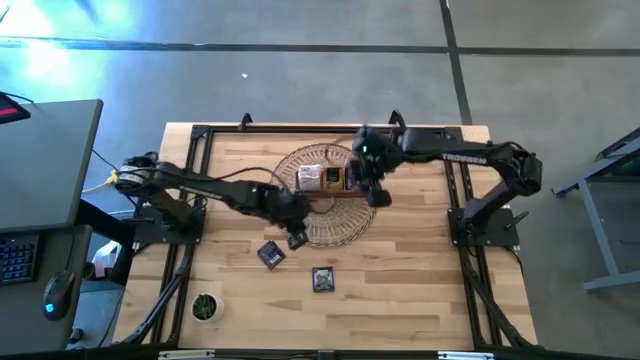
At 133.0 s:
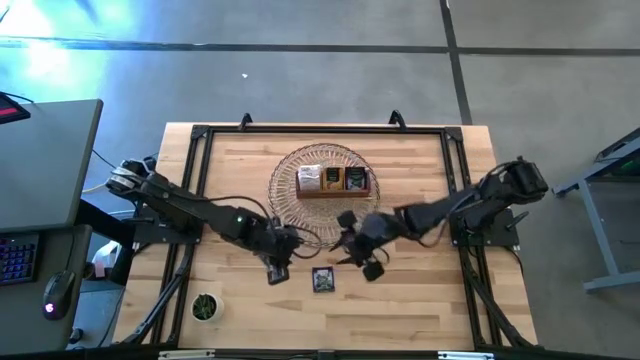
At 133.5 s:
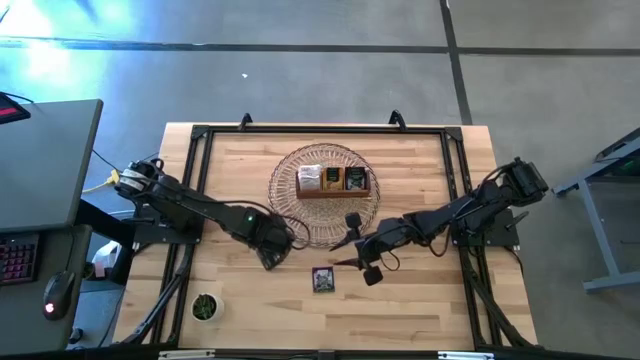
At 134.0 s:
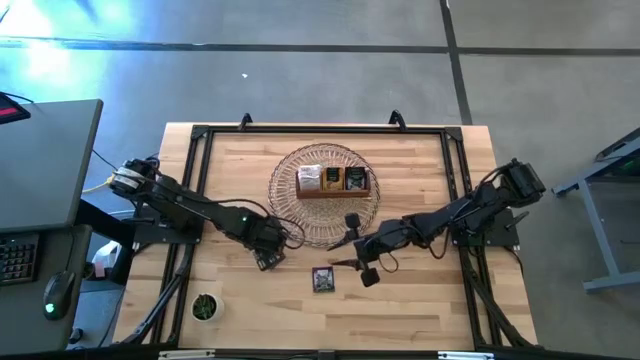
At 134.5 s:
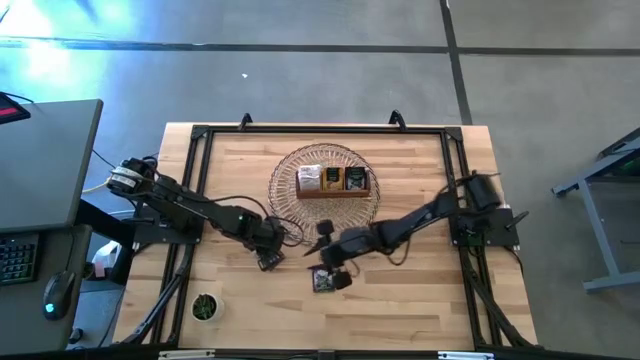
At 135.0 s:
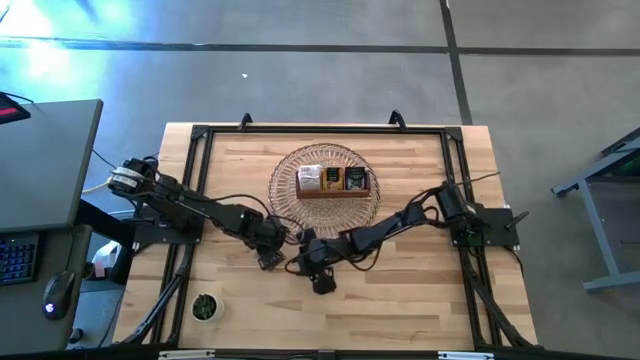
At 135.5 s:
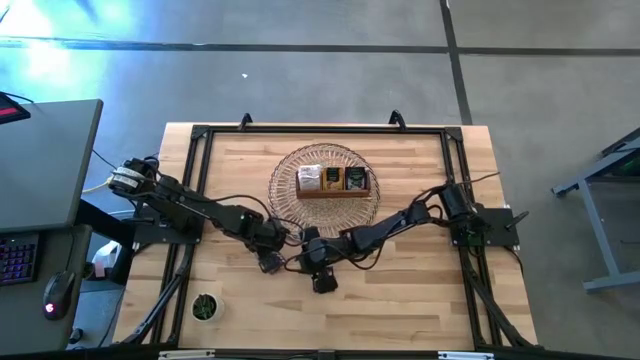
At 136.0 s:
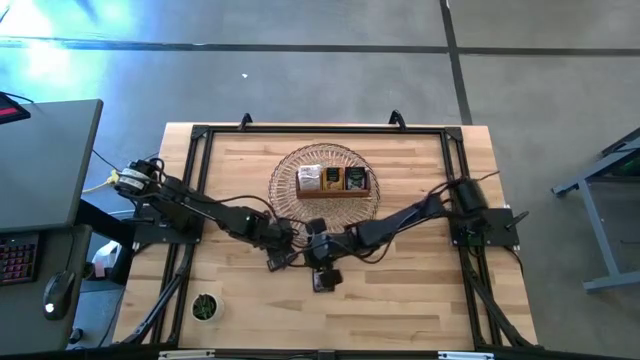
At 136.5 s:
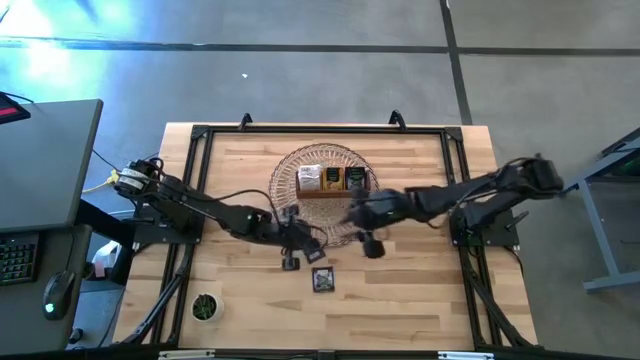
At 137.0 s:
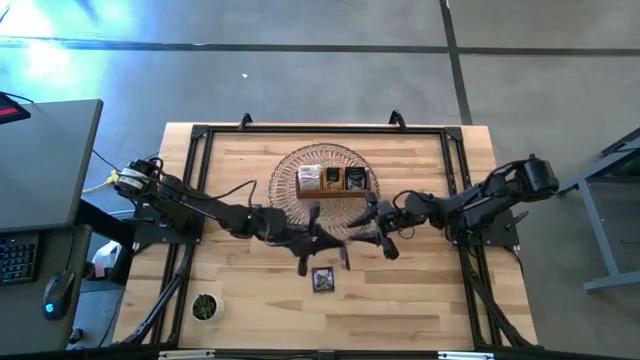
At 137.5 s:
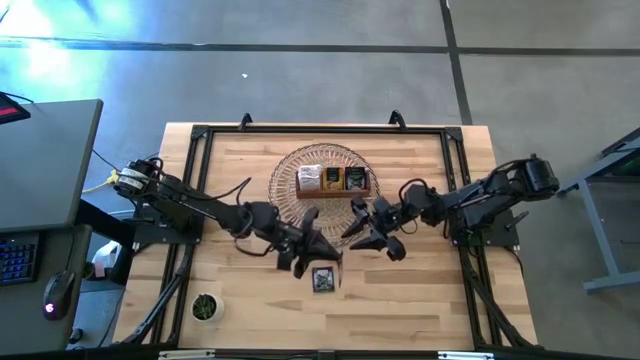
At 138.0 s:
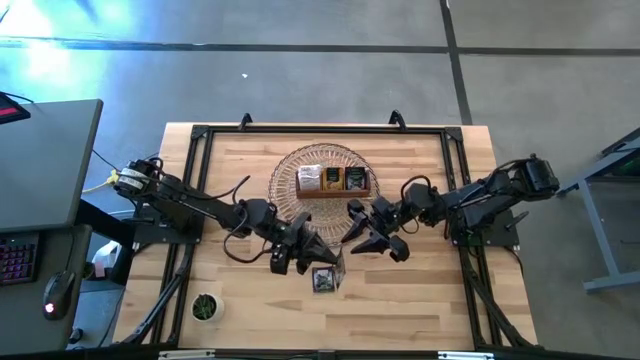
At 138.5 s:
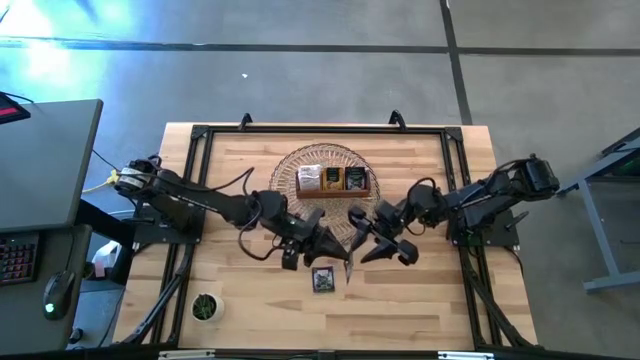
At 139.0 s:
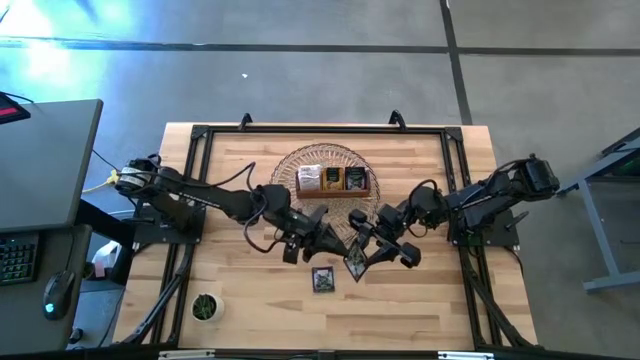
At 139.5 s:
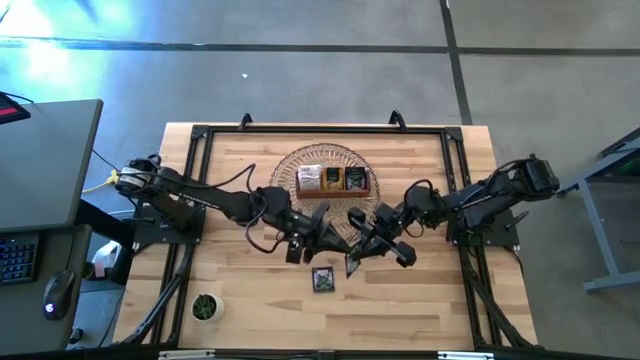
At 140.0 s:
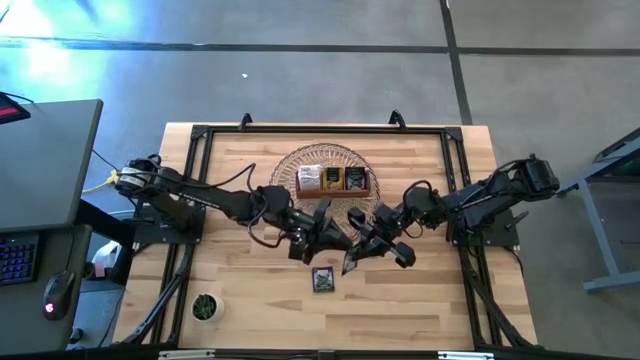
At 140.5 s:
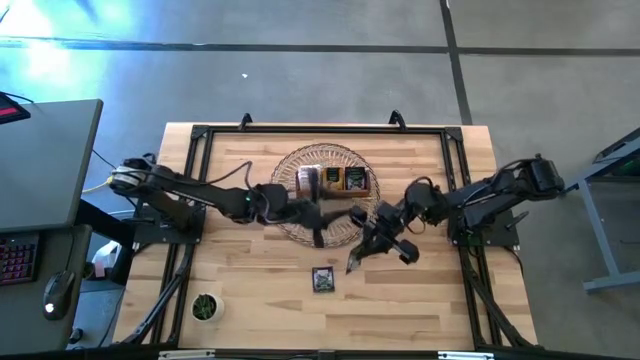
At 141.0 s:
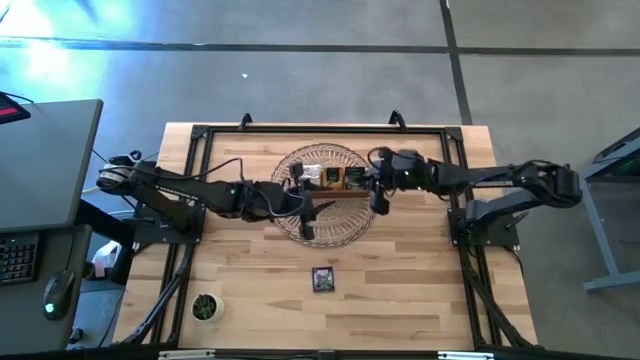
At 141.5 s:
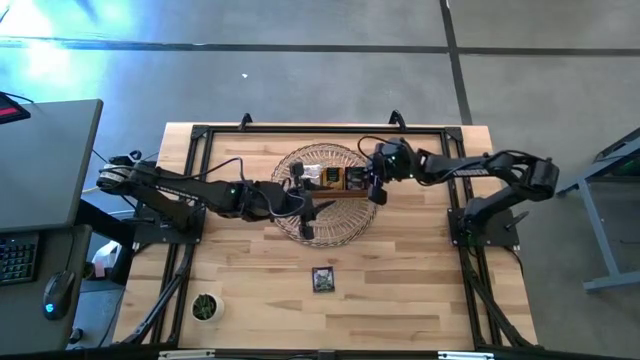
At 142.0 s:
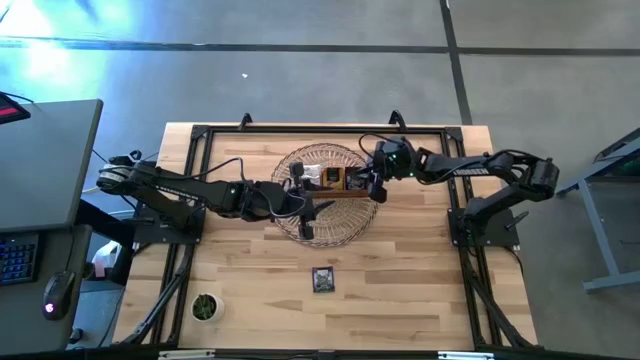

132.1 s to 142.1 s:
Task: Pick & Place Tea
Put the purple tea bag into the right section of the wooden organizer

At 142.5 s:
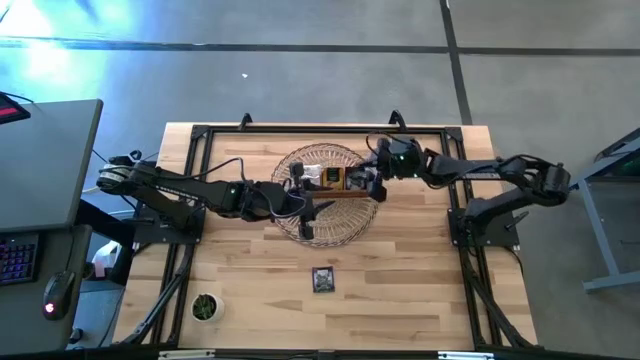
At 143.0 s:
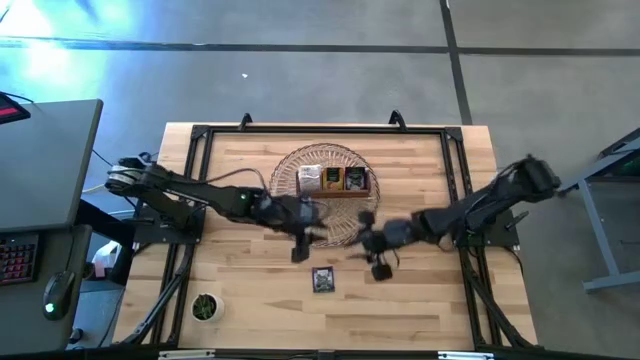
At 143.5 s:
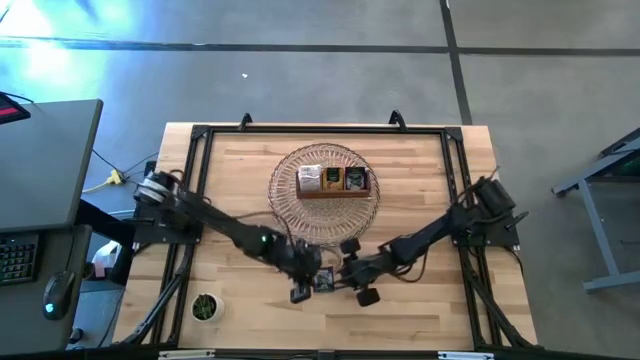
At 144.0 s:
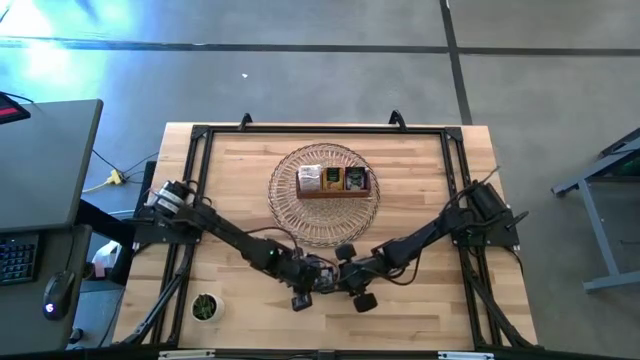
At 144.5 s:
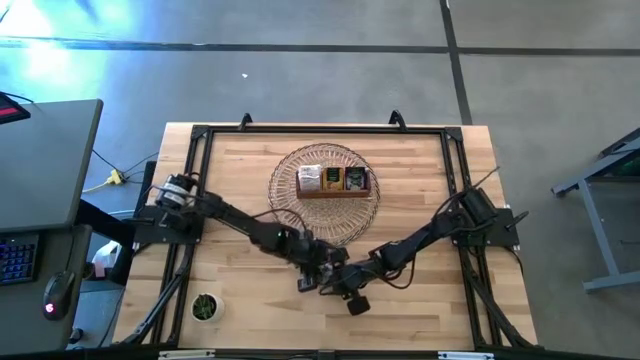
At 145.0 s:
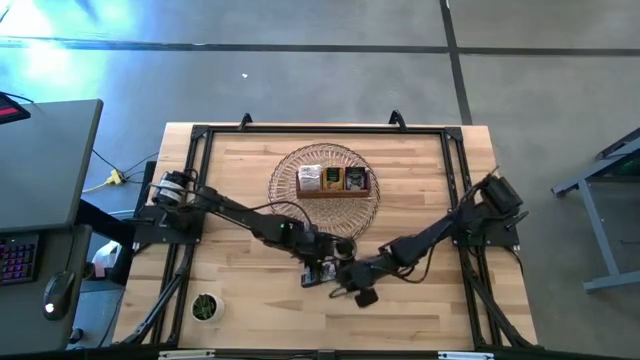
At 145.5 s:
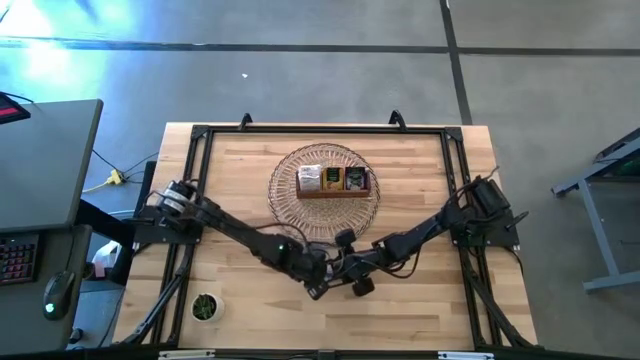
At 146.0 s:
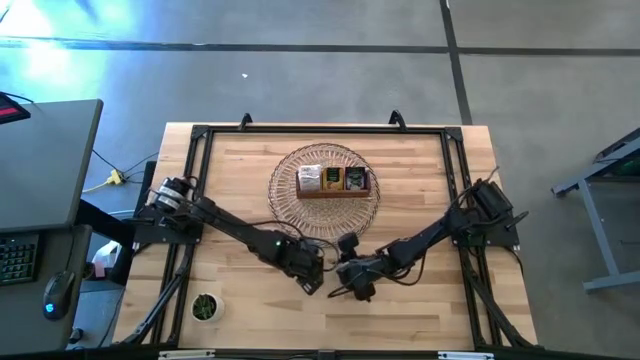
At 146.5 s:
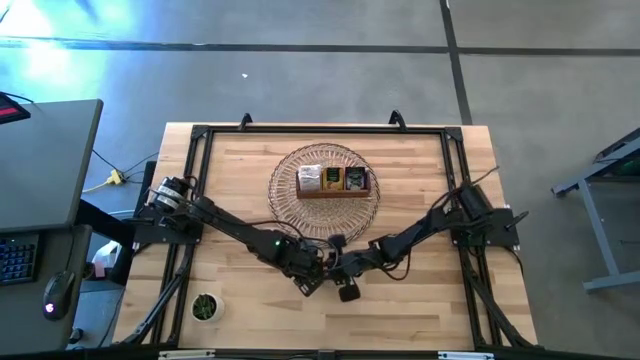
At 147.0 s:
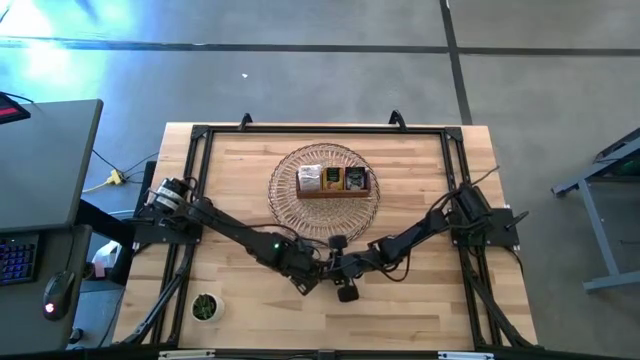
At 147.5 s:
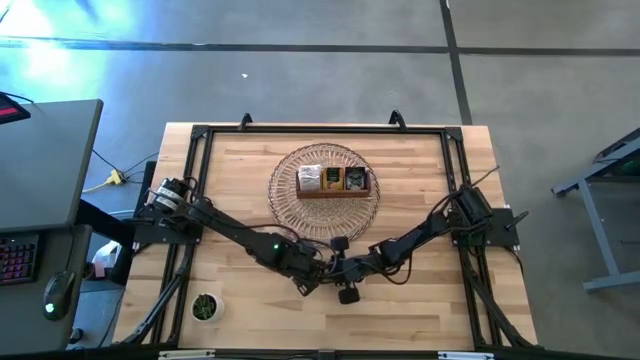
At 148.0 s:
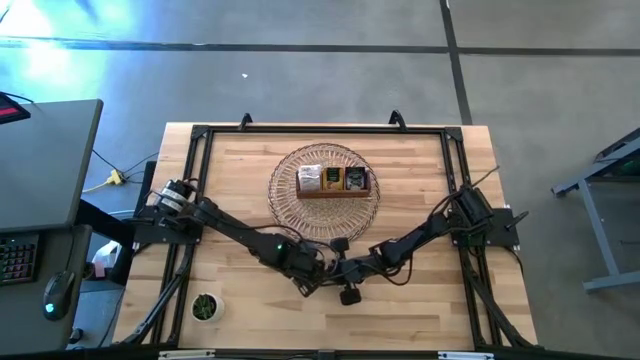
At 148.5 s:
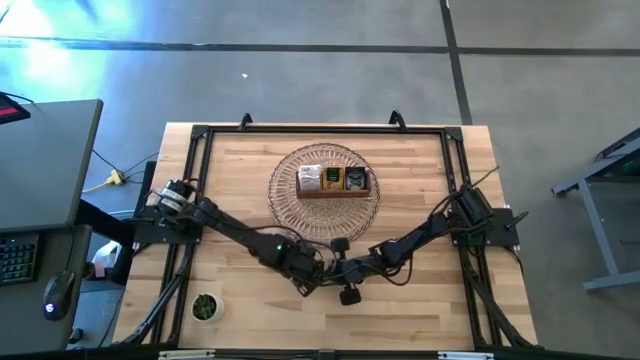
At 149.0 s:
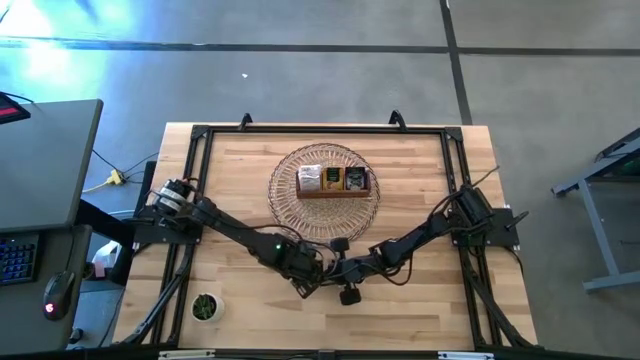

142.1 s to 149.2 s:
Put the purple tea bag into the right section of the wooden organizer

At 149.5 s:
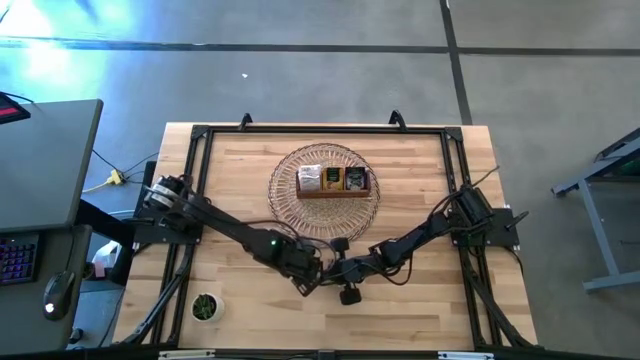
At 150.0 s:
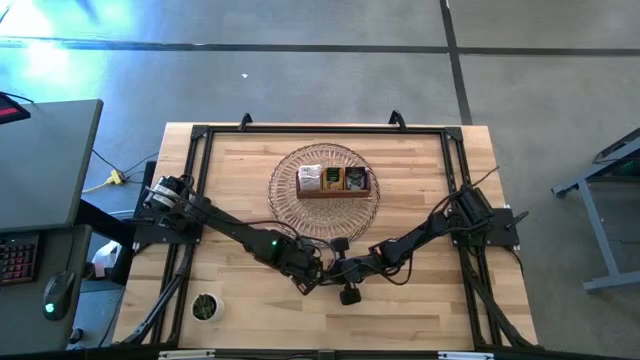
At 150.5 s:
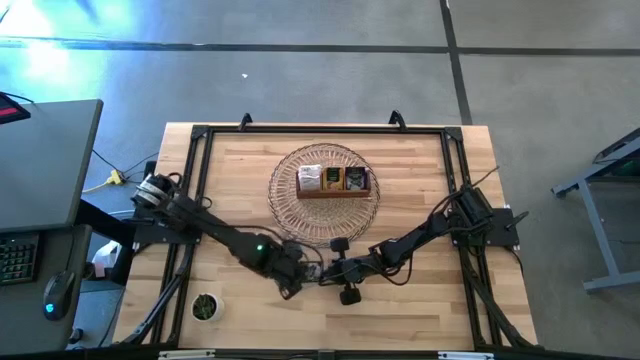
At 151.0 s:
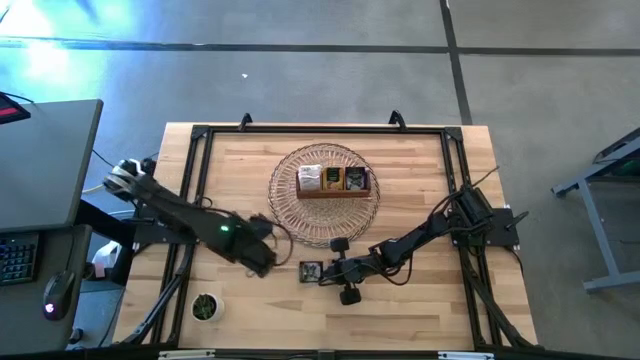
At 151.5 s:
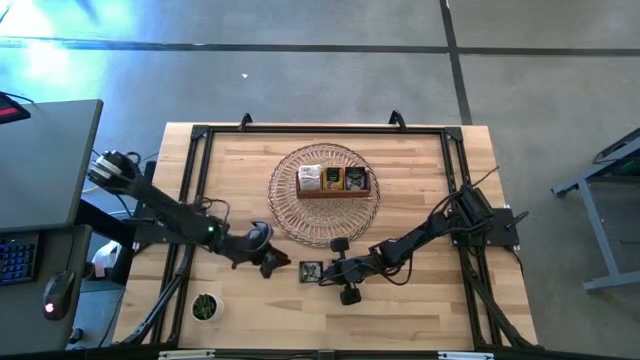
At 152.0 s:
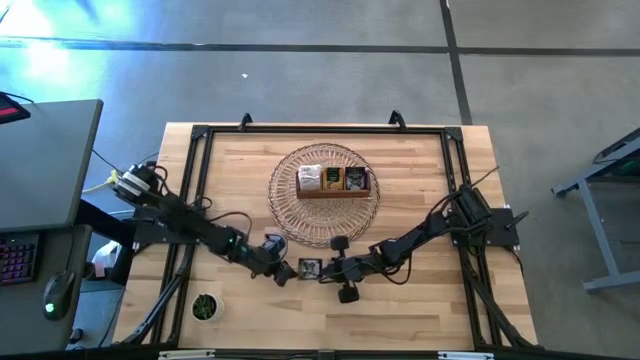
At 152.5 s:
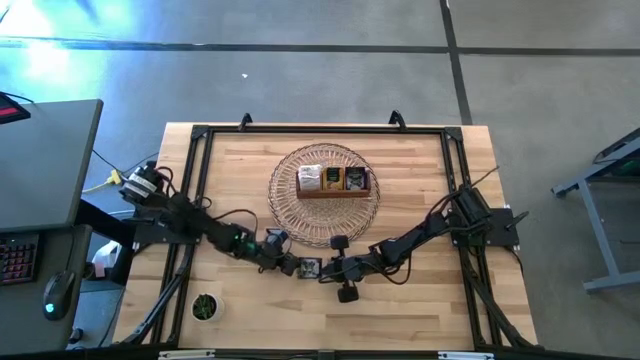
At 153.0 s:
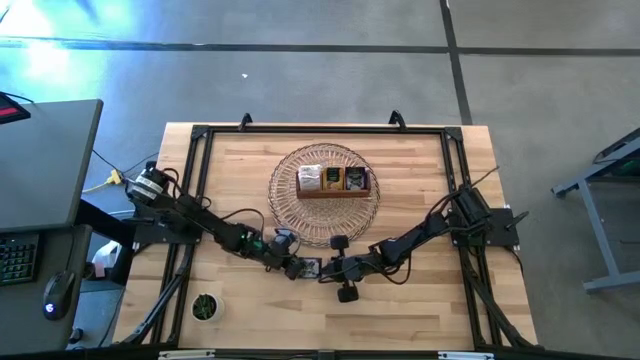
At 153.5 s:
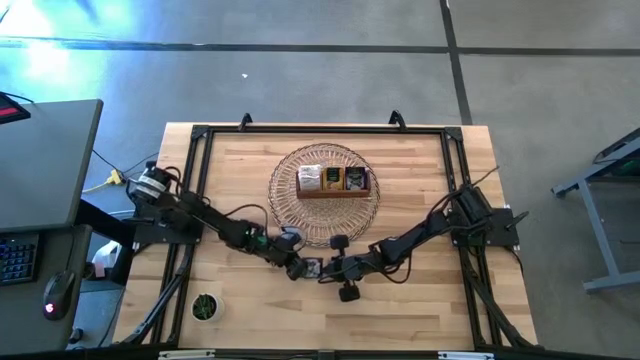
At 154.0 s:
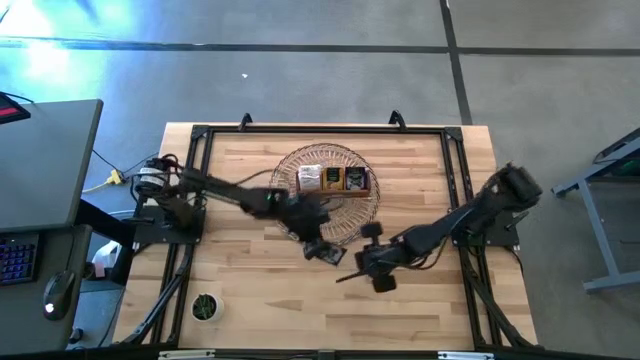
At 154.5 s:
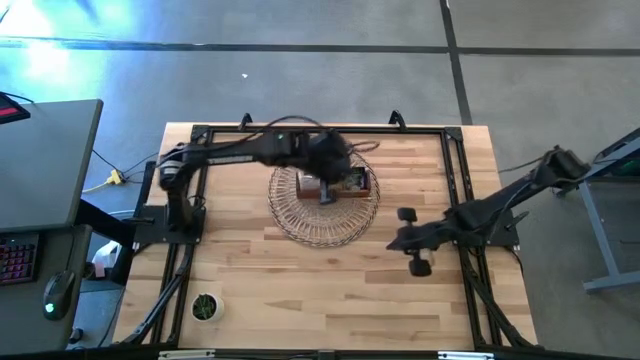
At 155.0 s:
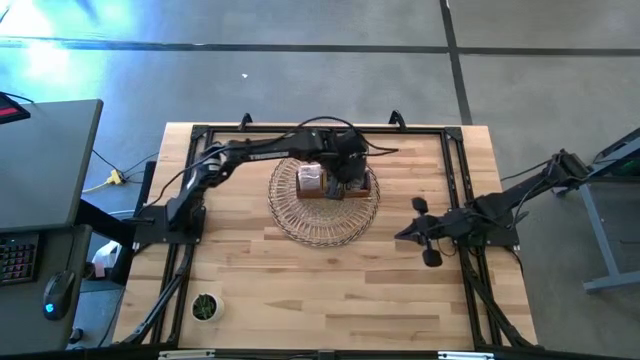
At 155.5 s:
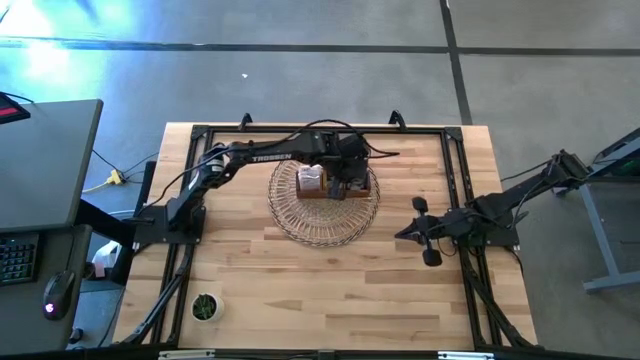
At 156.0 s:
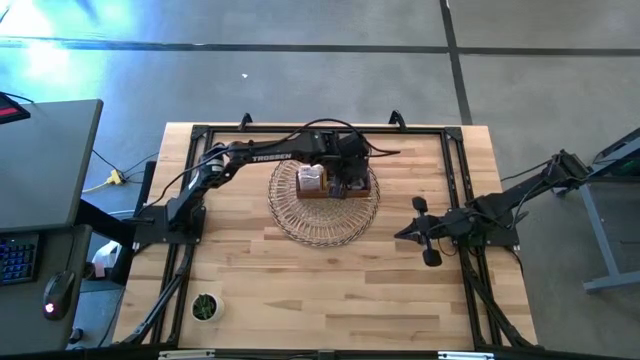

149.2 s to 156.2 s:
Put the purple tea bag into the right section of the wooden organizer
